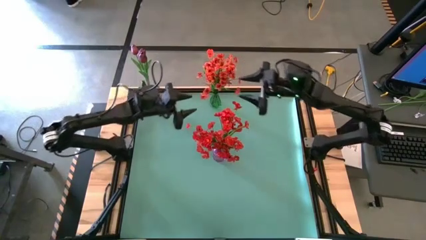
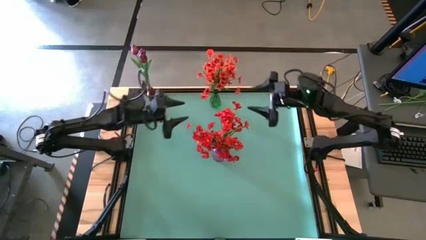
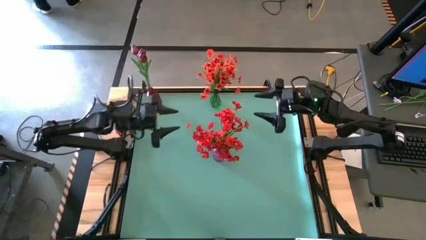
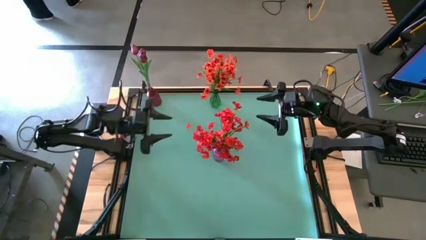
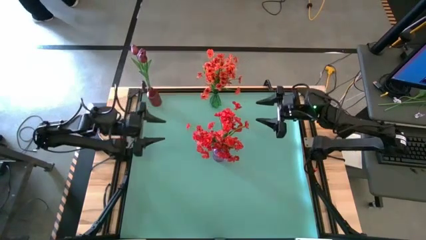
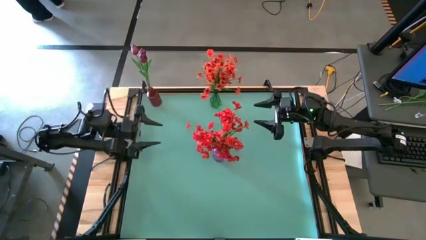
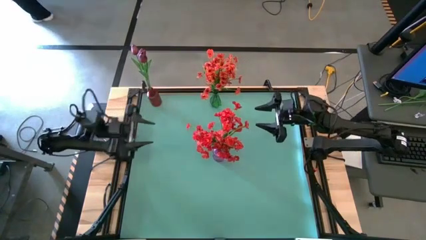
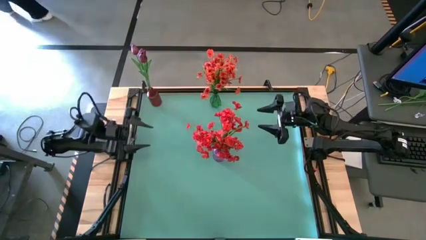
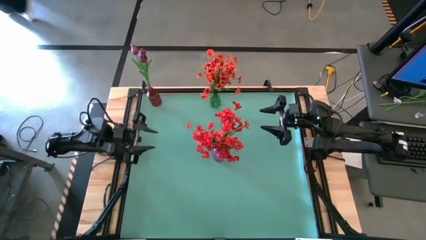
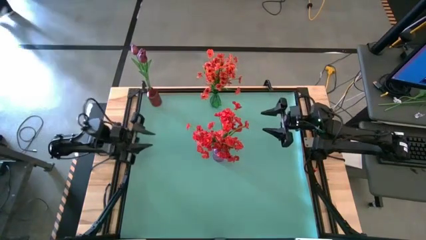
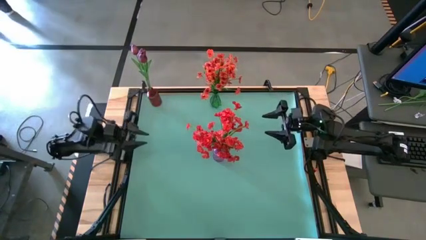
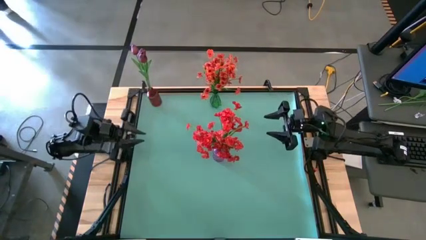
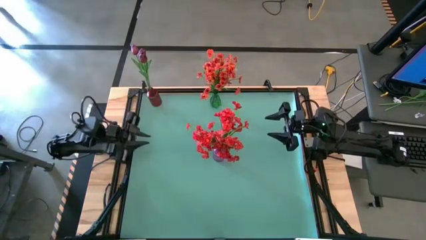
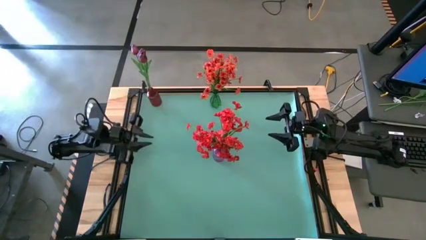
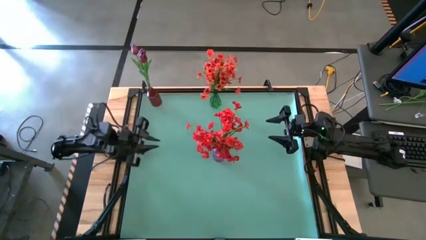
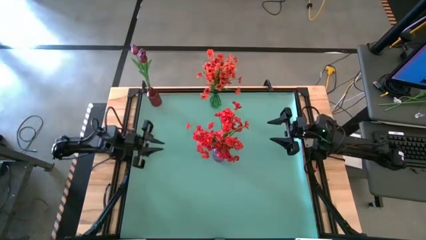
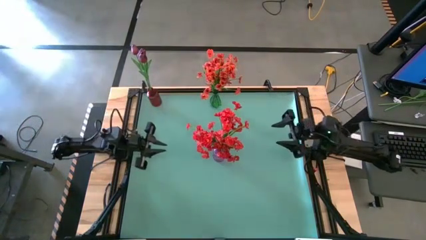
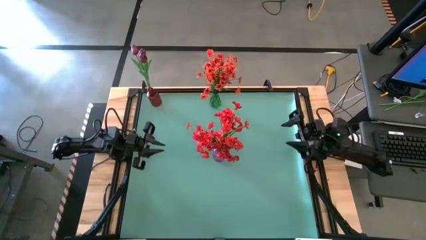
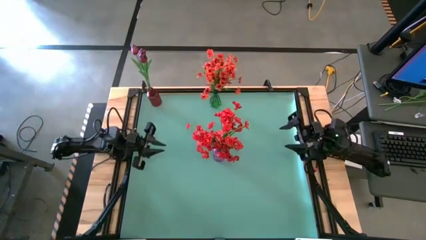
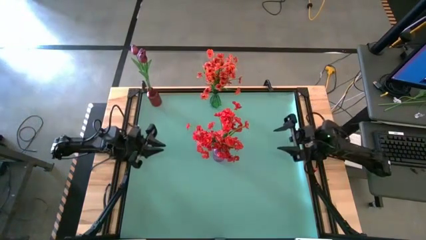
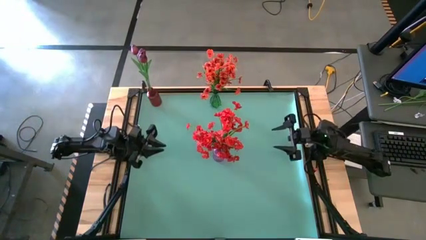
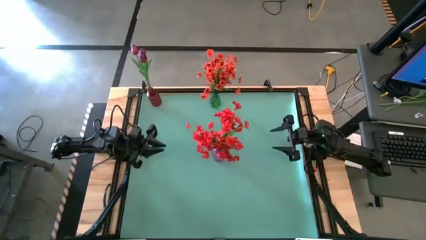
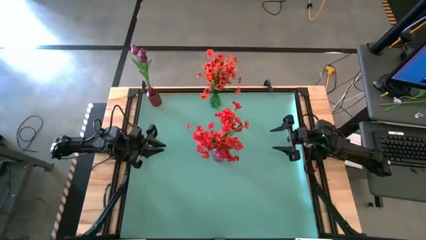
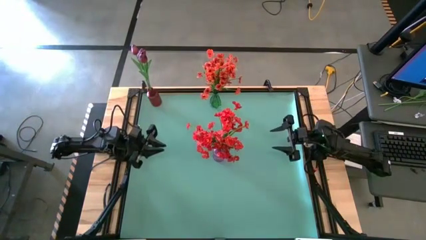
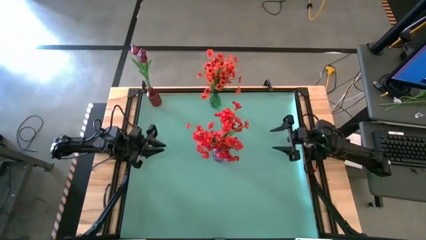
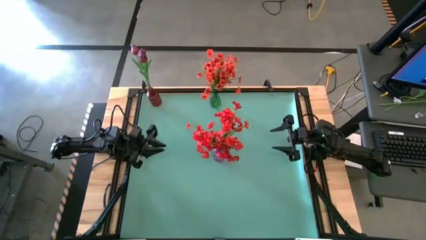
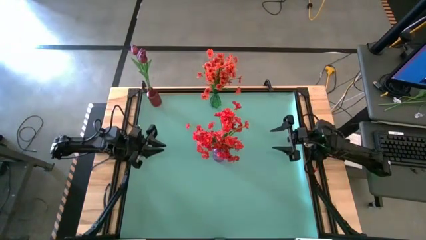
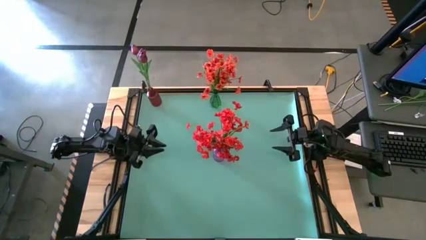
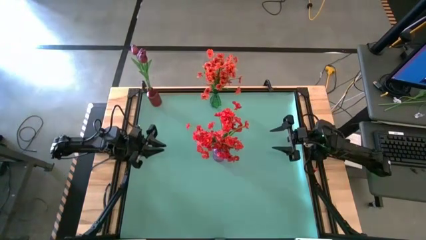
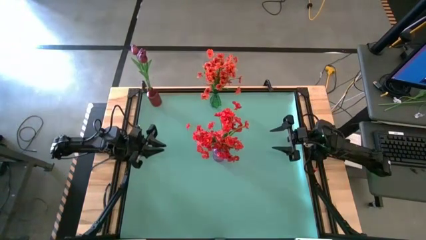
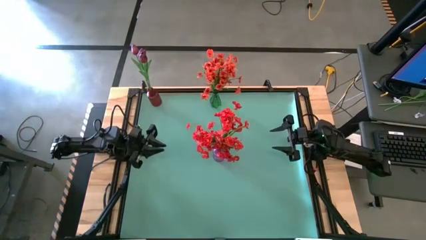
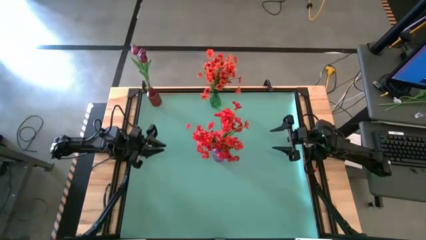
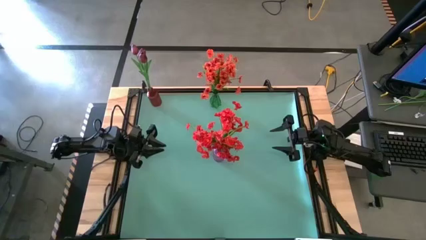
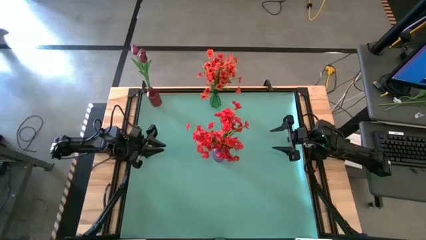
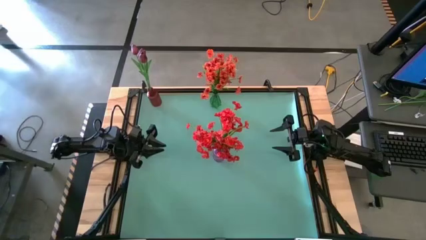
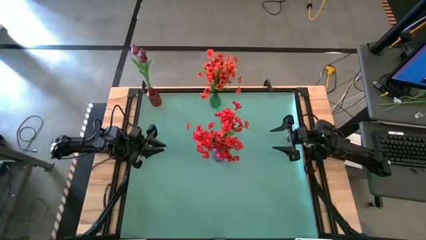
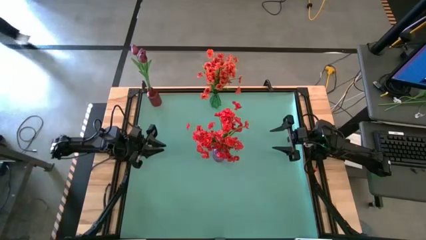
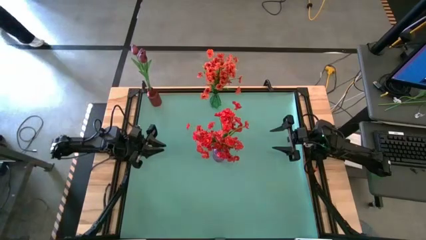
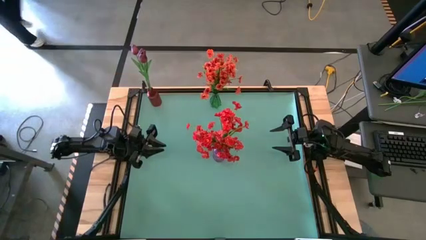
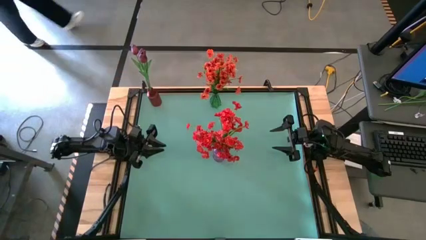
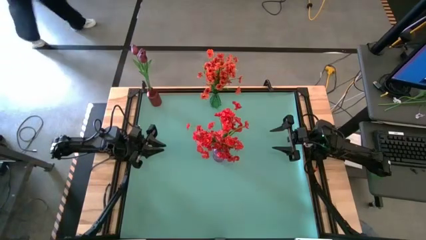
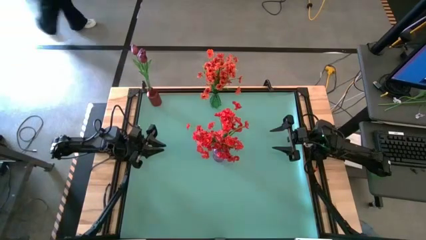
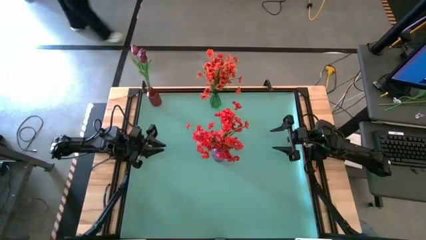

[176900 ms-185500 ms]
Task: Sort flowers into vase by color
Return to Home Position

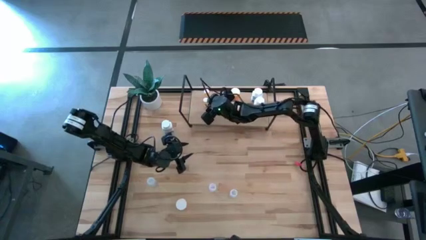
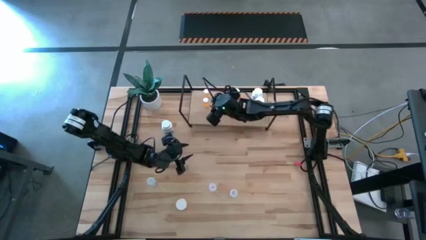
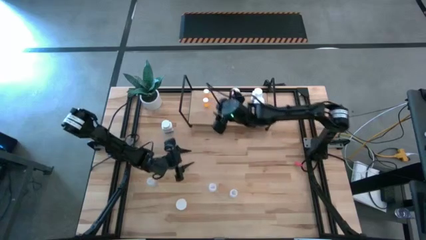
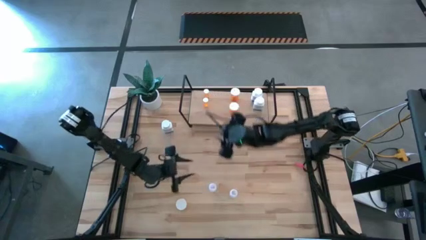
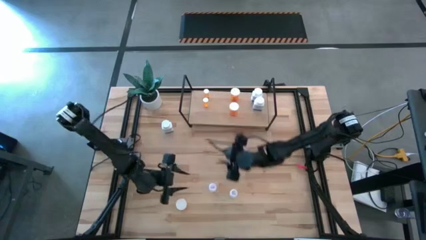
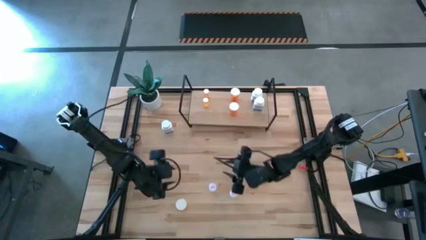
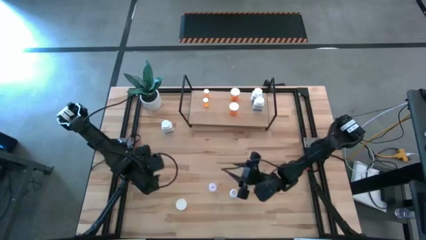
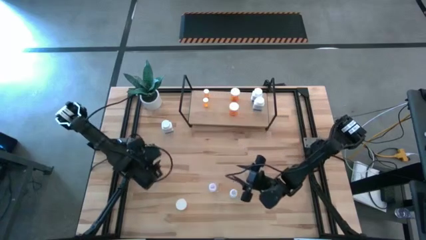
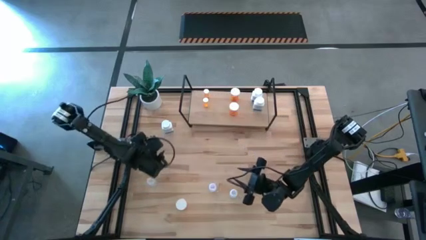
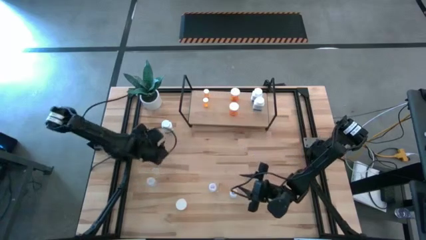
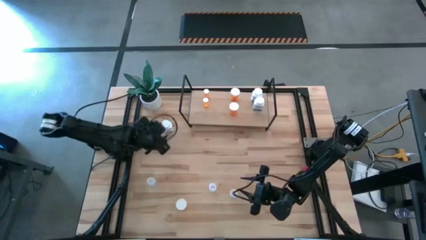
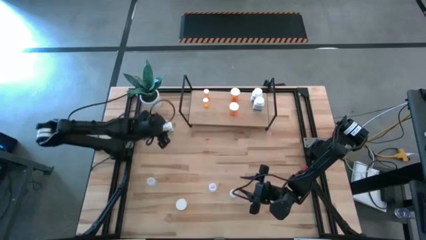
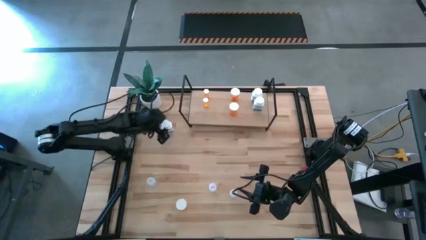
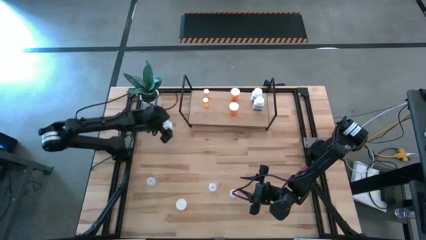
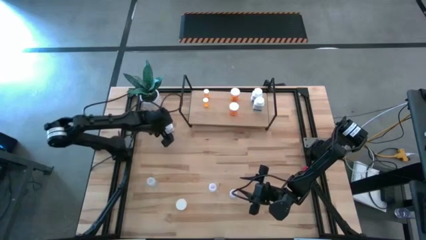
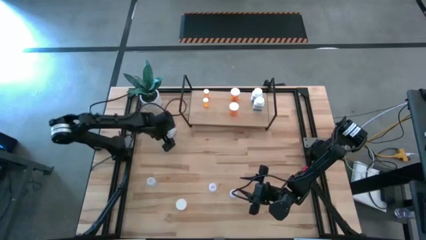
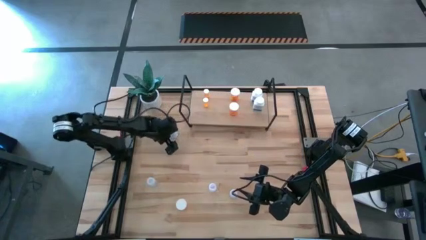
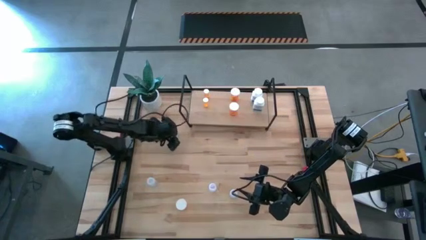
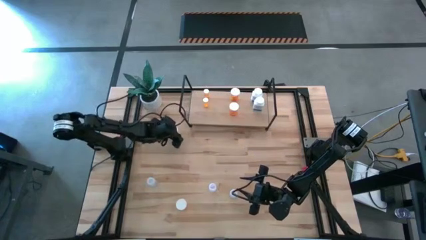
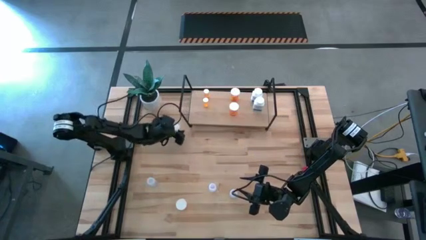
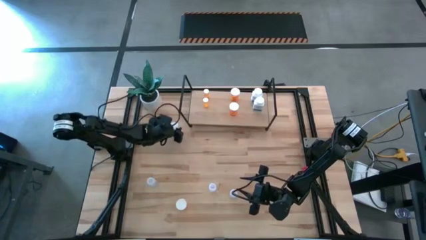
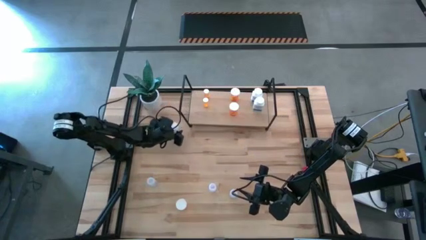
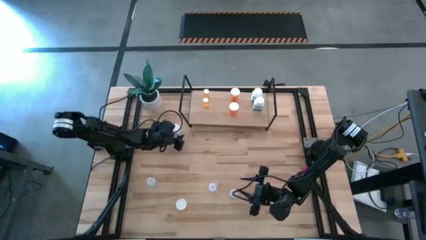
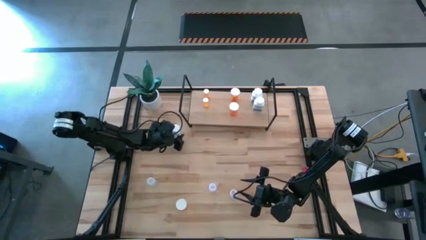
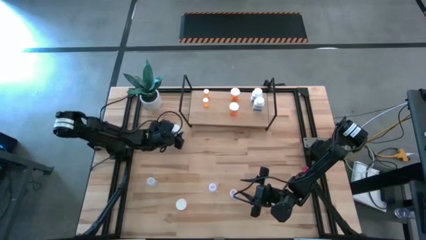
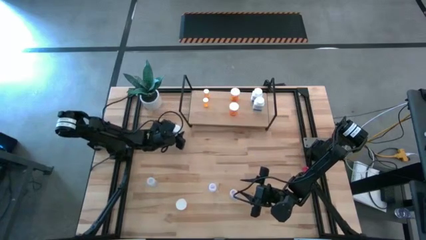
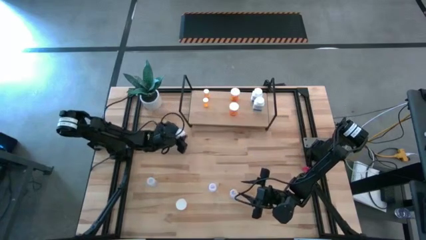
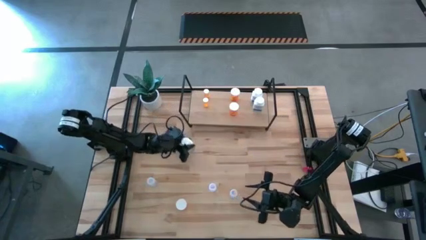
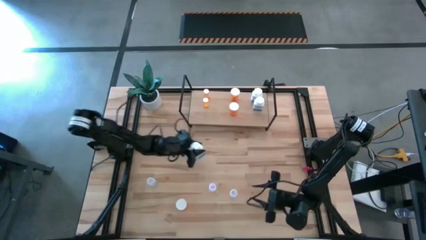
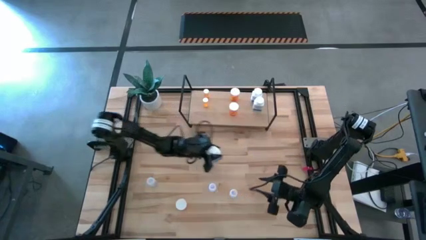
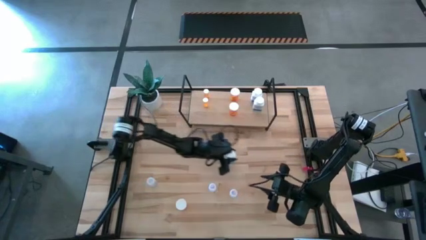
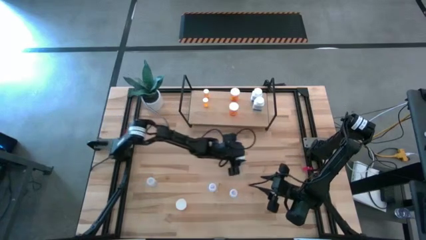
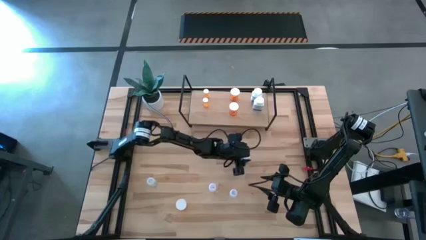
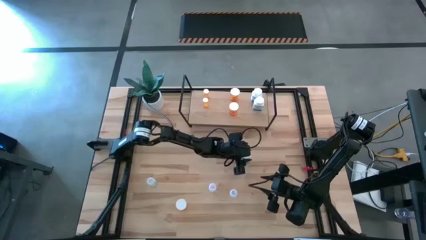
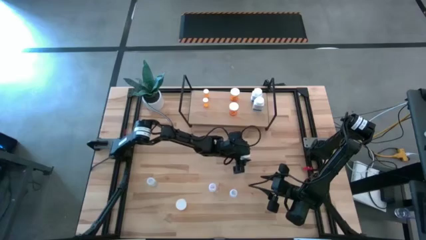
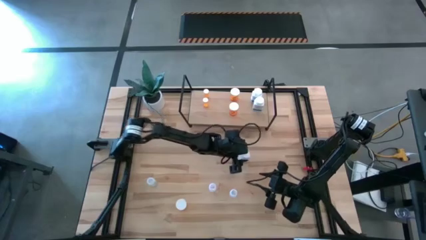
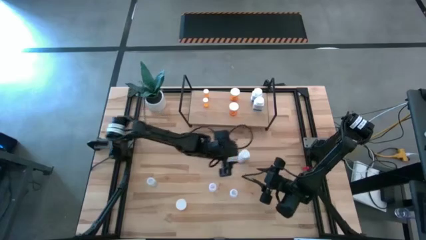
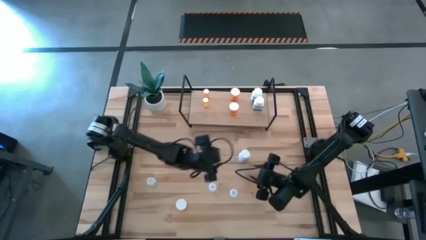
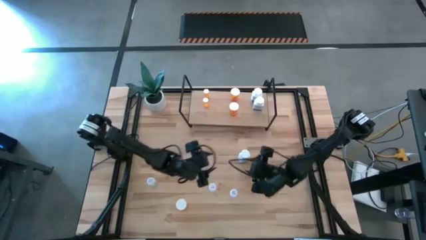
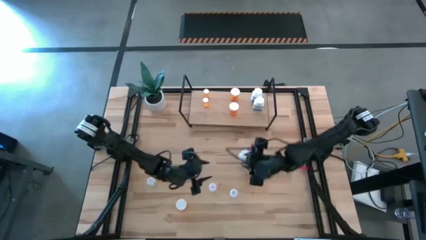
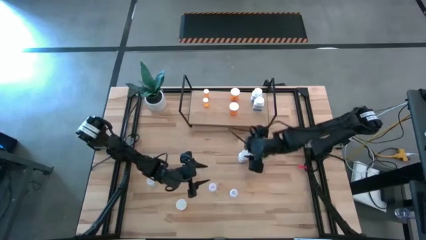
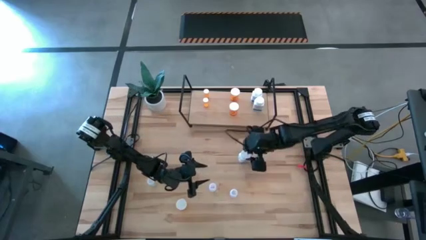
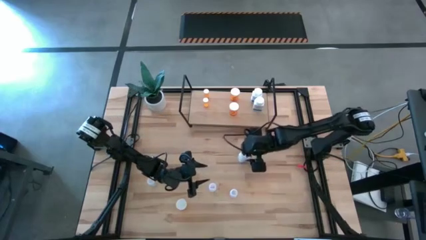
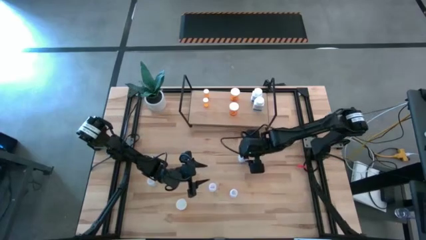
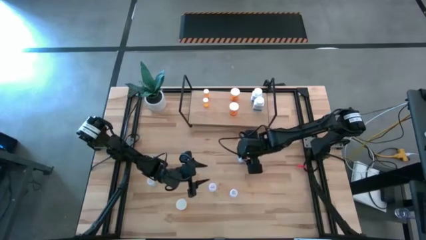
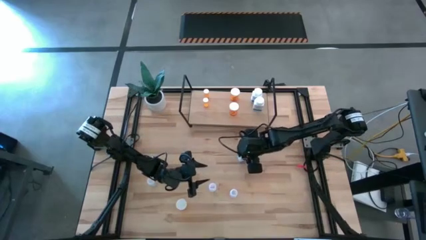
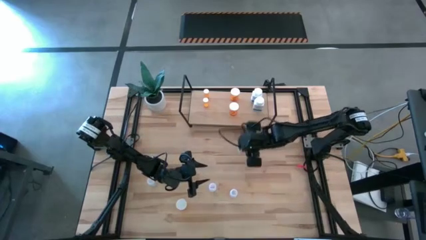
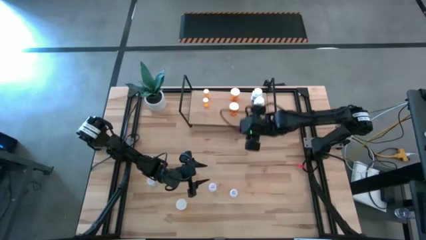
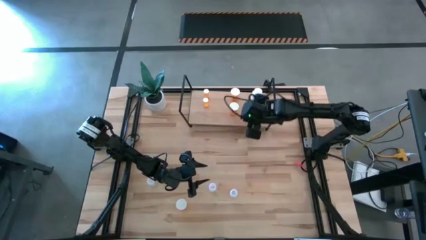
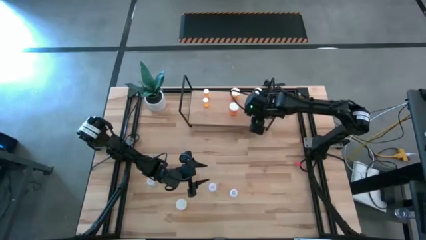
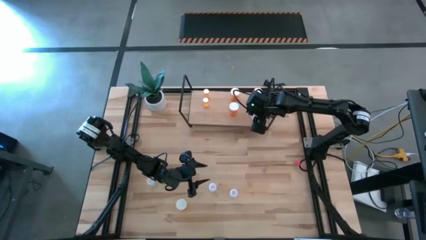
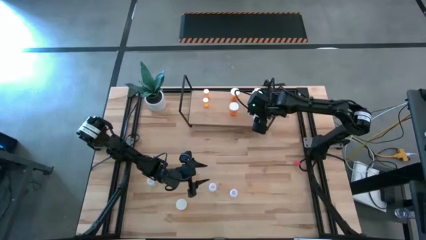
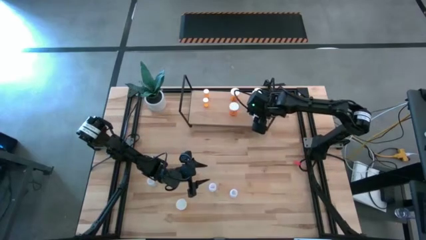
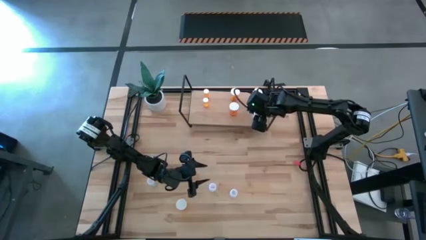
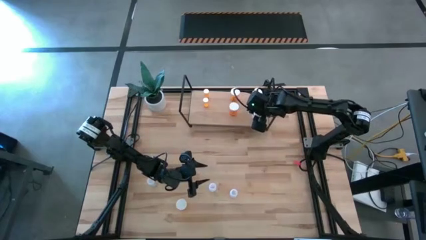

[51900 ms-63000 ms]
Task: Pick and place medicine bottles onto shelf by color
Put the white medicine bottle on the shelf aligned with the other white medicine bottles
